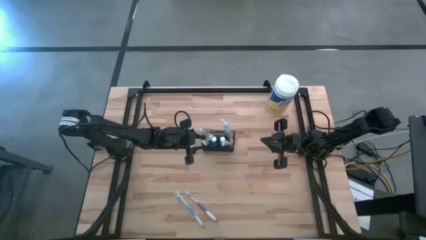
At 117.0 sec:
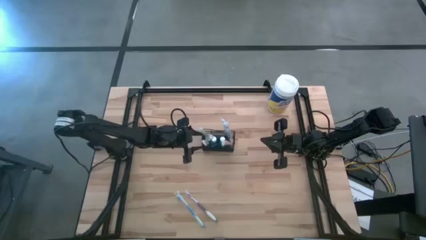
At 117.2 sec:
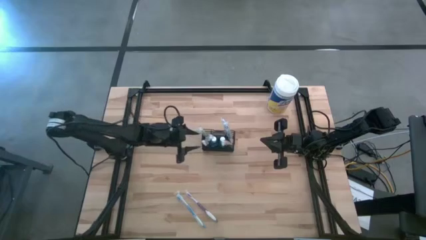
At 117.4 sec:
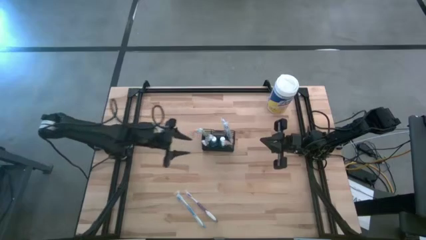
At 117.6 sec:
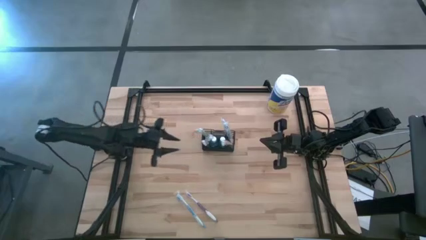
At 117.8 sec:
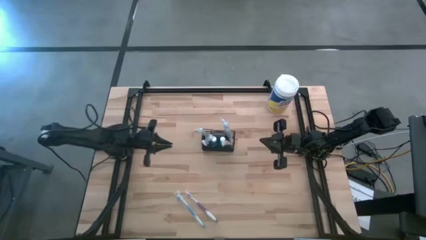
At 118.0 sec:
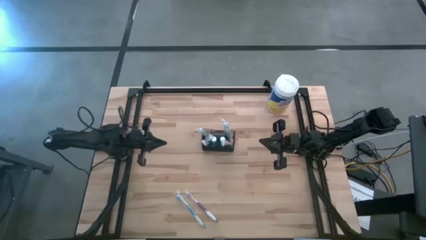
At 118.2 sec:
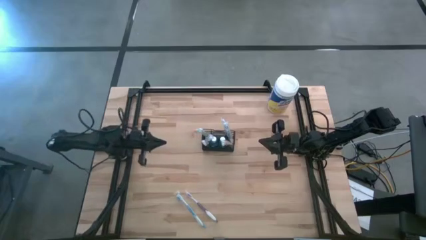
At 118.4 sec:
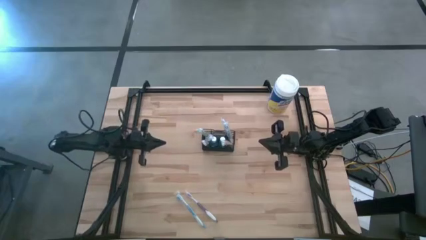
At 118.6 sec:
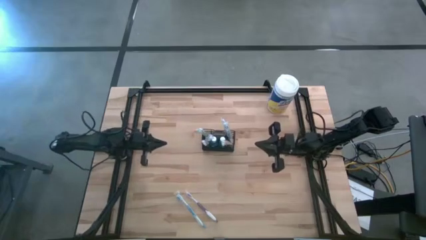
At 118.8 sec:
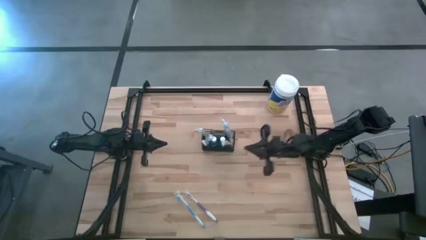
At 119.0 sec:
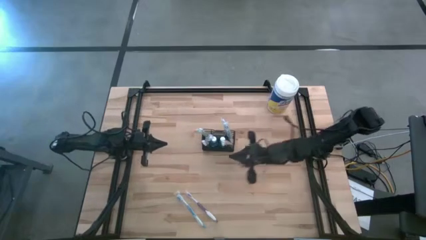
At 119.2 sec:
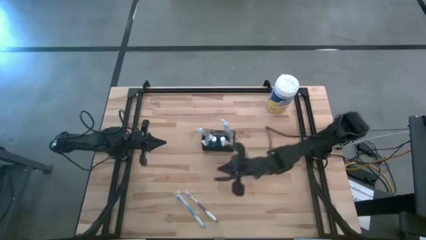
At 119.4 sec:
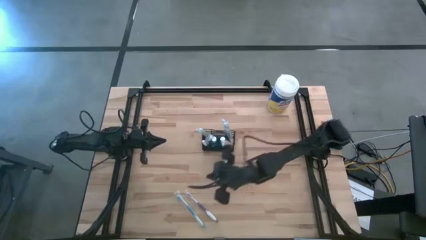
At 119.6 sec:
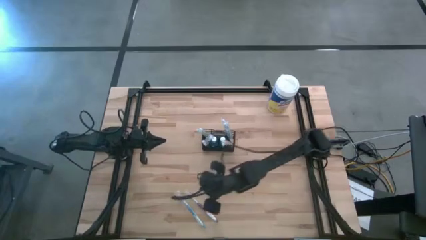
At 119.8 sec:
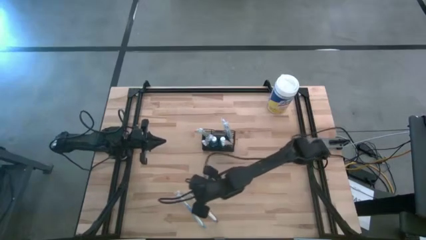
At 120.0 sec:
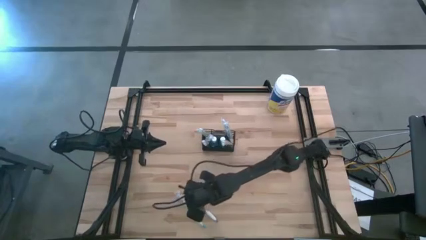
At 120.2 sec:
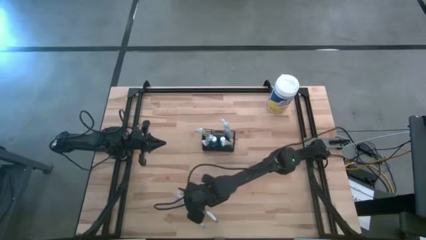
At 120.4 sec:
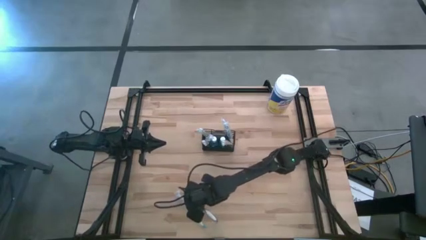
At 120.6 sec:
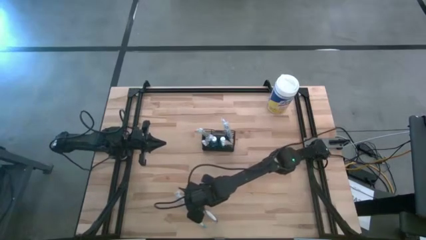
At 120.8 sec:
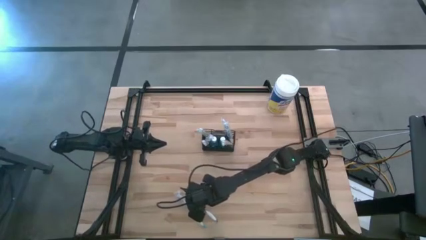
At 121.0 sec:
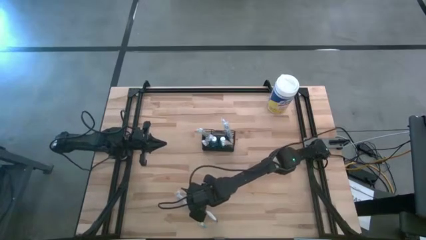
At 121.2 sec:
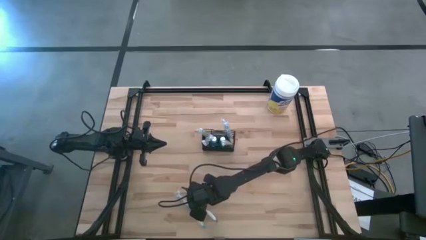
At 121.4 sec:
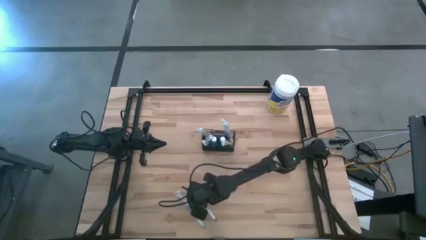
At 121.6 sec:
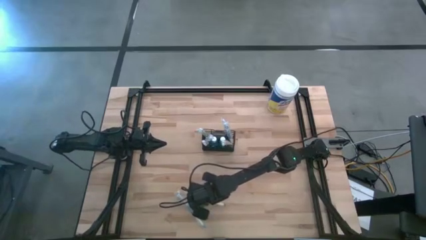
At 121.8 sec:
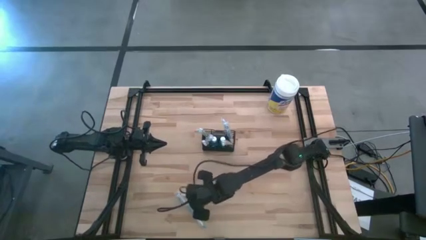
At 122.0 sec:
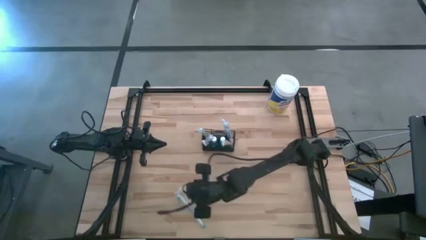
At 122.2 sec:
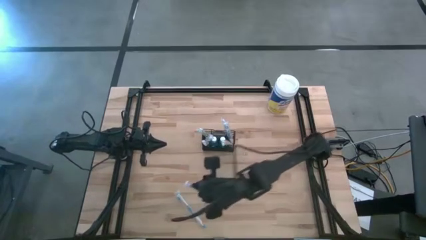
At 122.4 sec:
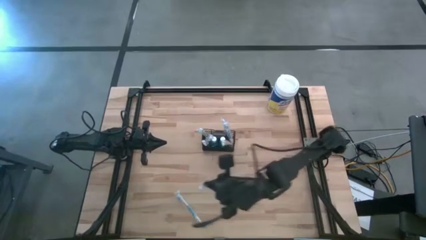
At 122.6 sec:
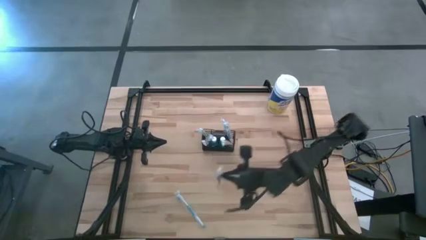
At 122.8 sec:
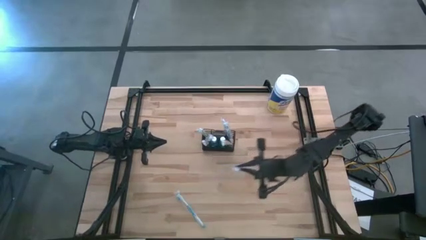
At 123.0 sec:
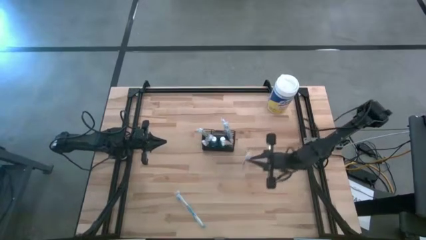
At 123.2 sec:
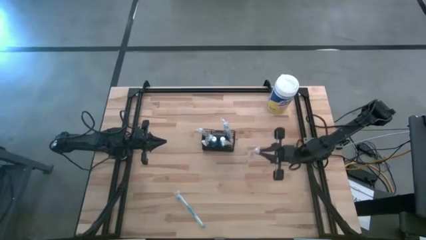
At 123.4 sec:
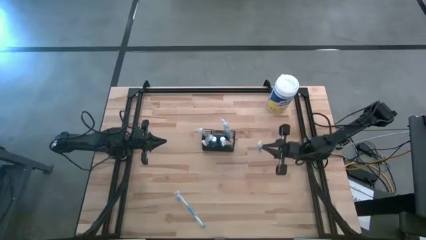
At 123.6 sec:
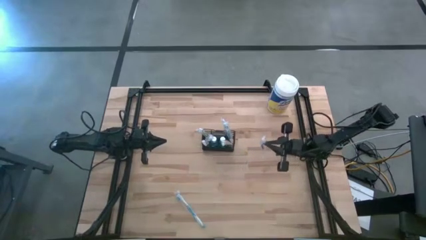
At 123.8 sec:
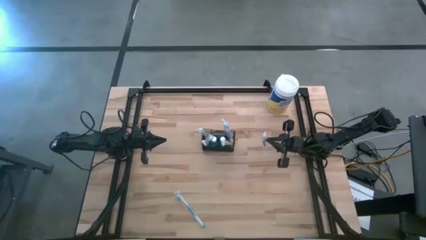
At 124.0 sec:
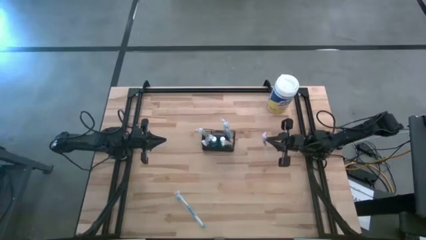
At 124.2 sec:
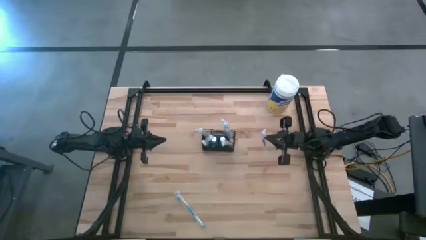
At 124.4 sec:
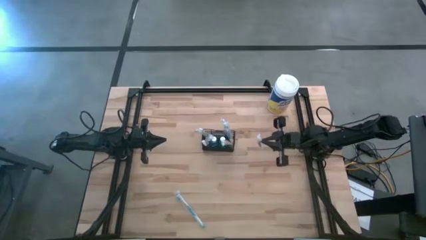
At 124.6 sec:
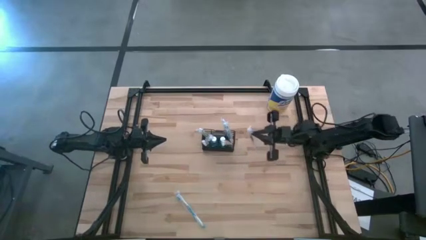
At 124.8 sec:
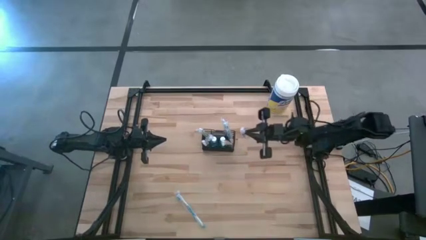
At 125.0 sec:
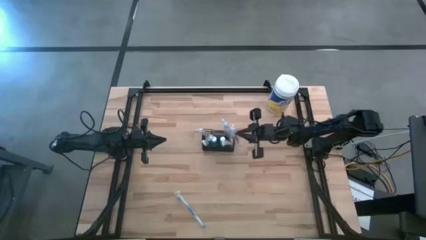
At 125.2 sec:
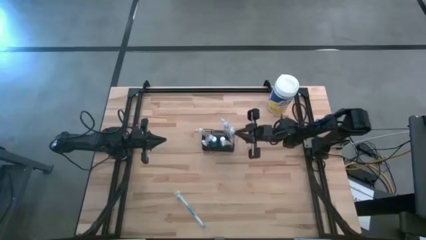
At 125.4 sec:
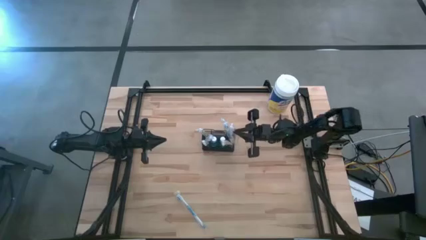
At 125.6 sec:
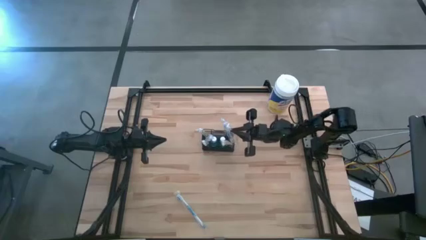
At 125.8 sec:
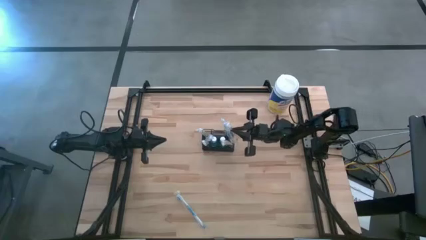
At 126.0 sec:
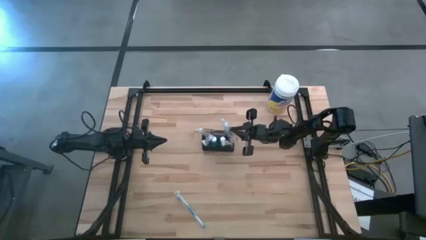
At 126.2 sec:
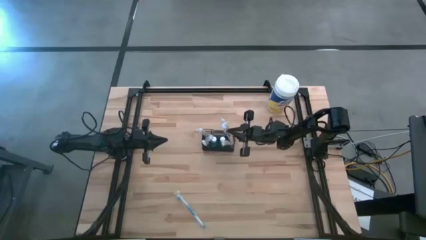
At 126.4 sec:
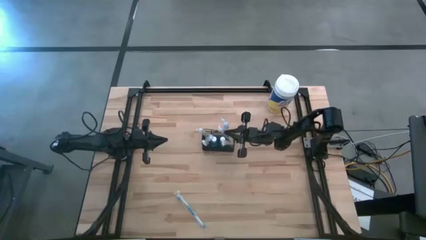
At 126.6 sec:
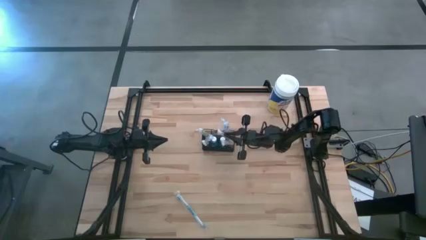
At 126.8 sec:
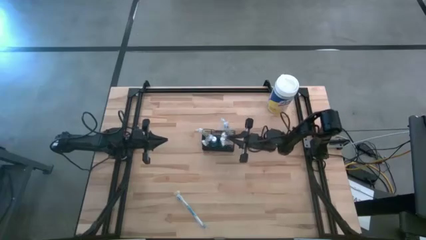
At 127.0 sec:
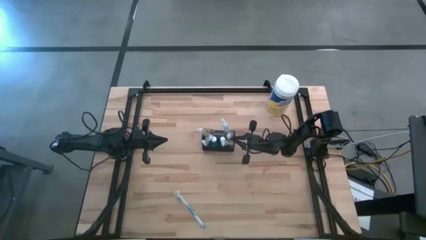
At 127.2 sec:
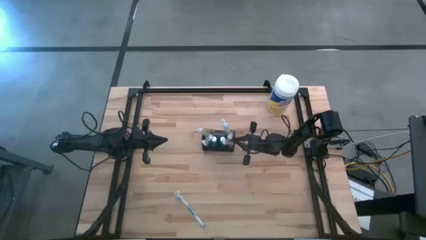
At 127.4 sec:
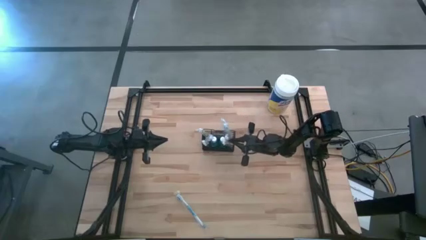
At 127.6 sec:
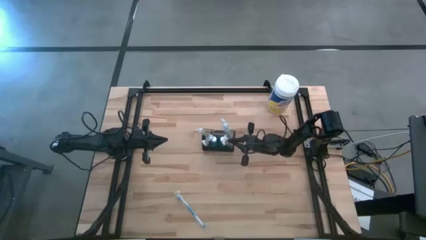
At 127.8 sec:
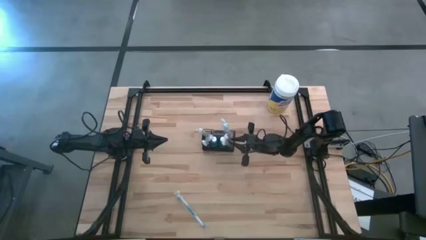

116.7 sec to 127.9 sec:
Task: Pick & Place toothbrushing station
Put the purple toothbrush into the wire organizer

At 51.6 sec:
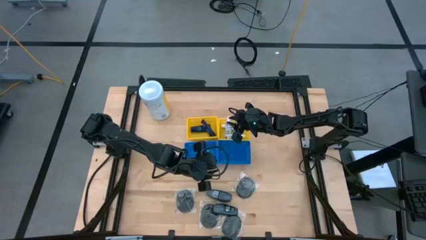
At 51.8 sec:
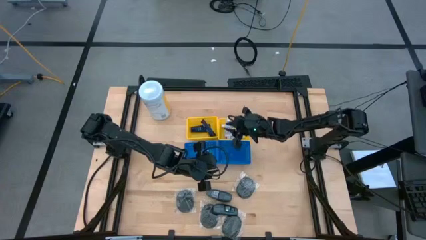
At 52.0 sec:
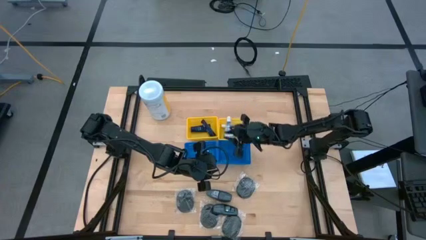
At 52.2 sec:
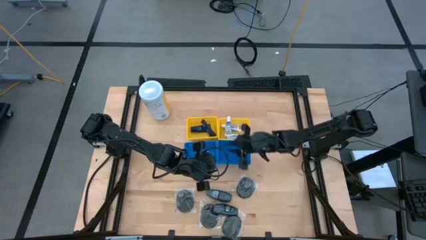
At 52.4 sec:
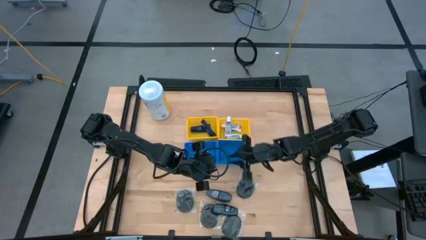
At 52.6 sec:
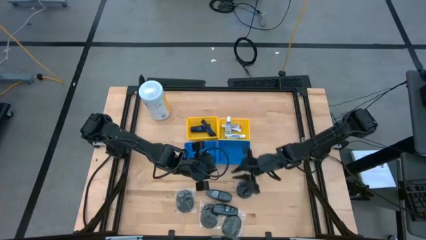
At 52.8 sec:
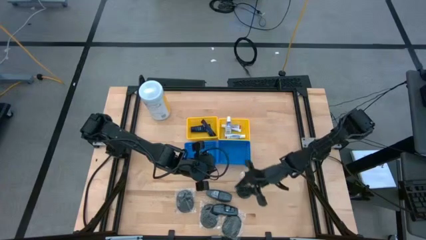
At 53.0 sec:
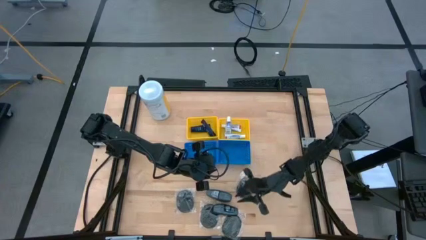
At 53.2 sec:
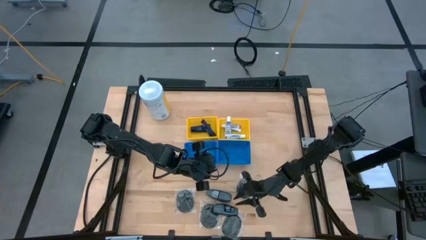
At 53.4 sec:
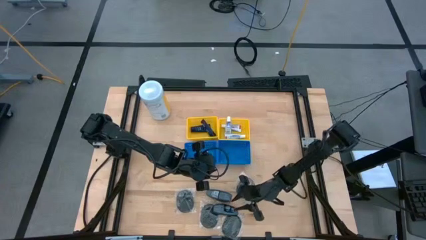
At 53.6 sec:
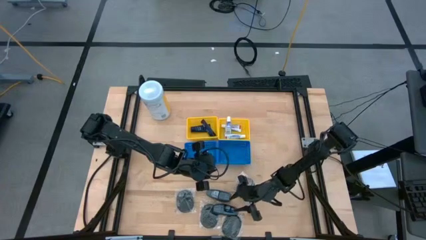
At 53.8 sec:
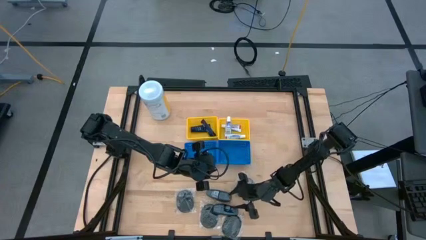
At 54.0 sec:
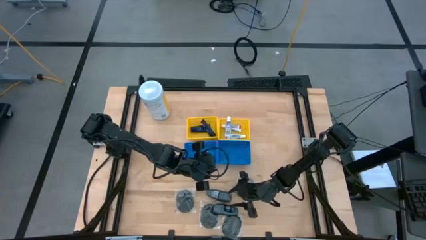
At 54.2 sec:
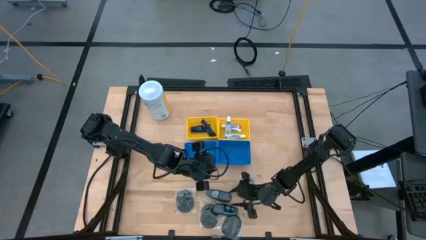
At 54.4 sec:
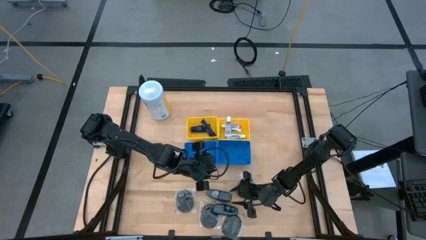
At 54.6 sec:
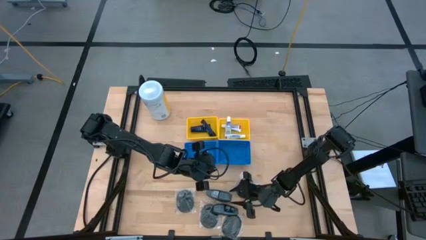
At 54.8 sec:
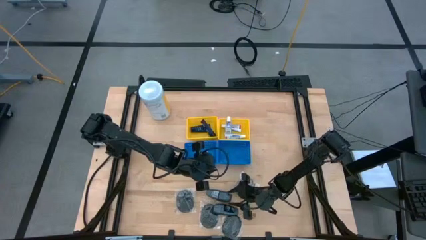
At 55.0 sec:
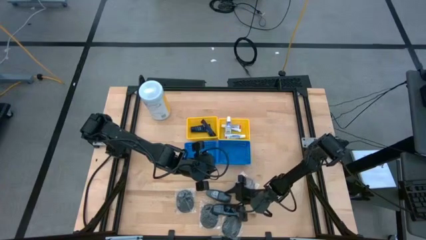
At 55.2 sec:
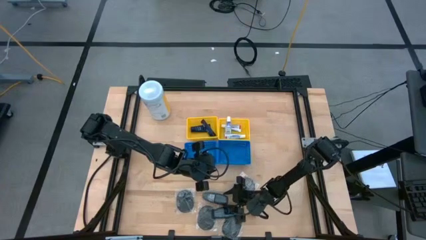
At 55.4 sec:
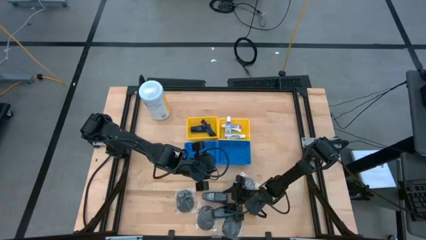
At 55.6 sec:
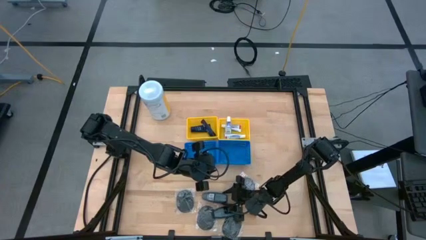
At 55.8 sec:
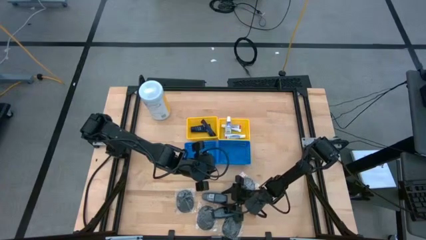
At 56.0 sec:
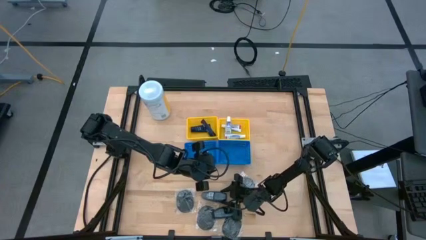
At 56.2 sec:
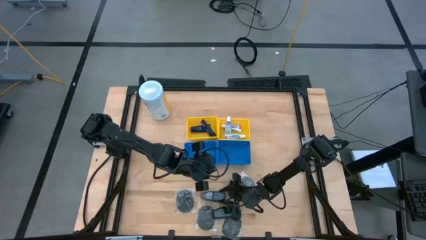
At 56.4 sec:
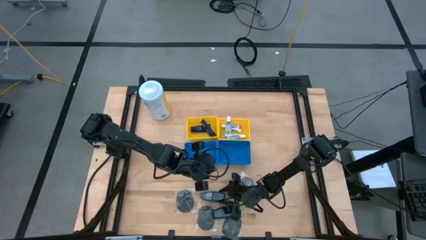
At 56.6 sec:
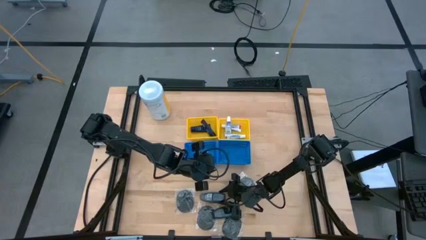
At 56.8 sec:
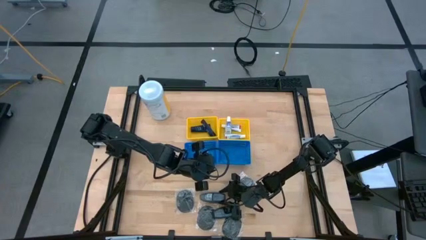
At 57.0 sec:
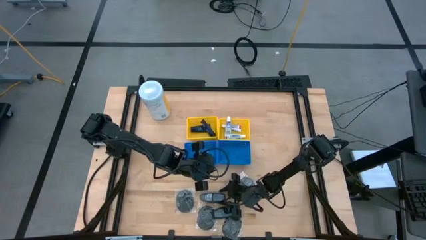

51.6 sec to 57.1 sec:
Task: Pick & Place Travel size toiletries
Put the top deodorant into the left blue bin

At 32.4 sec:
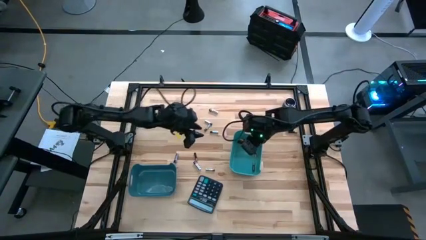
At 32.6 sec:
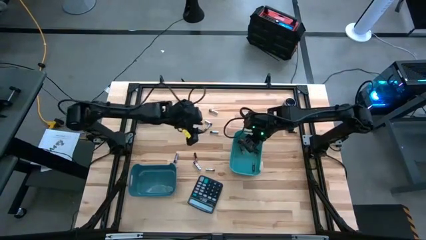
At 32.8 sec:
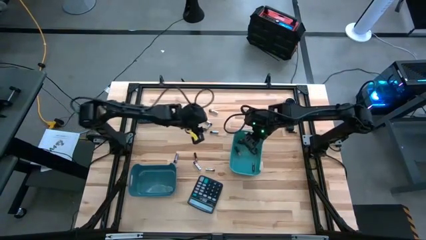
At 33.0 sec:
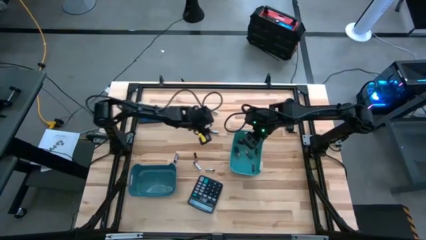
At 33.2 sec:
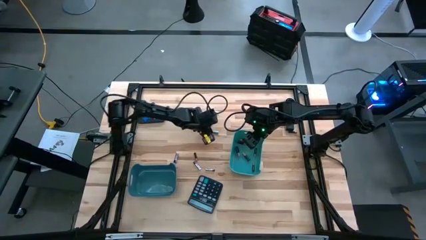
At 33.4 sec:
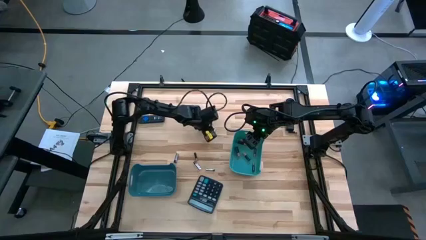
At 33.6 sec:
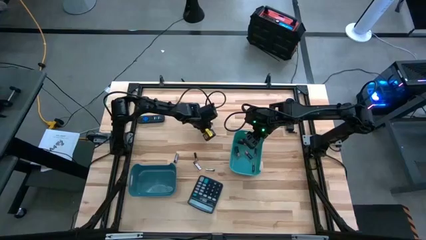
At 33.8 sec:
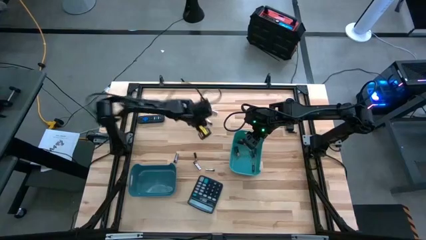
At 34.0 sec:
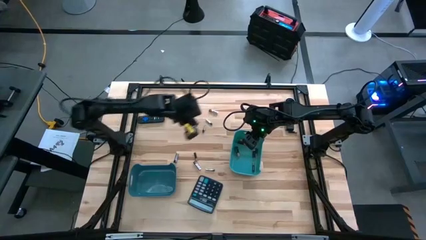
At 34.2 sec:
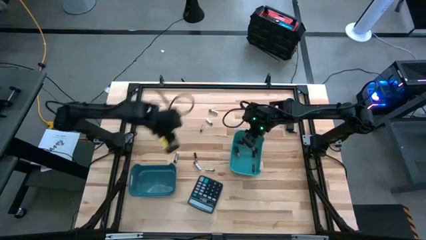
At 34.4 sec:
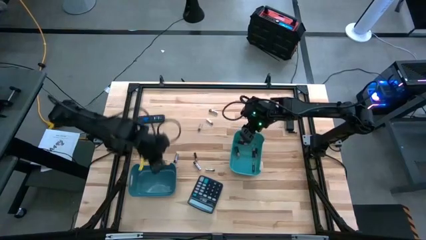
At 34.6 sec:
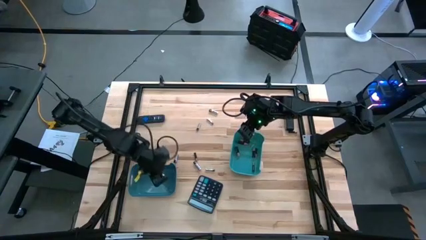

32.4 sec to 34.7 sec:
Task: Sort batteries
Put the silver battery into the dark blue bin
